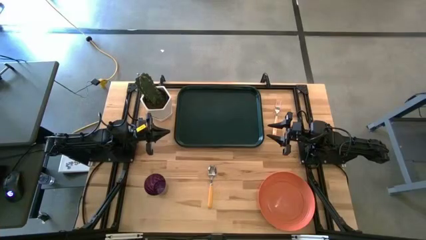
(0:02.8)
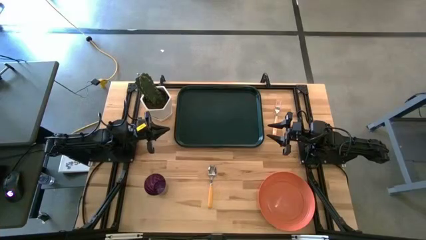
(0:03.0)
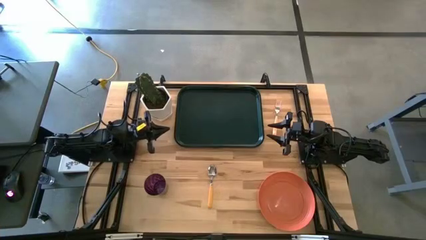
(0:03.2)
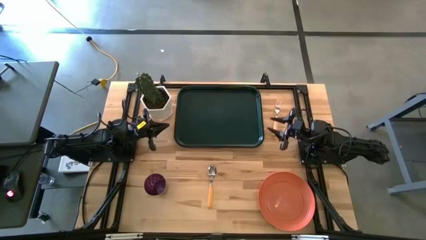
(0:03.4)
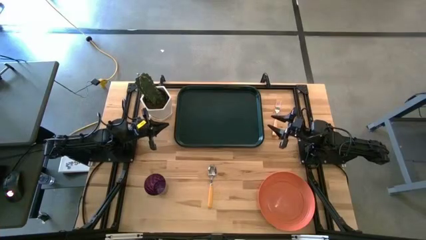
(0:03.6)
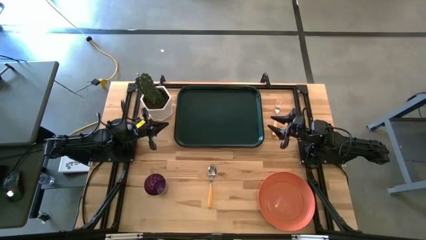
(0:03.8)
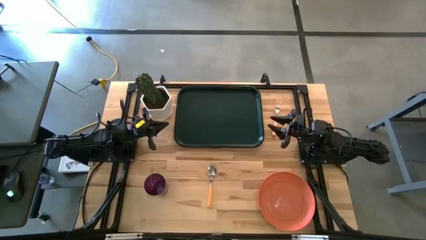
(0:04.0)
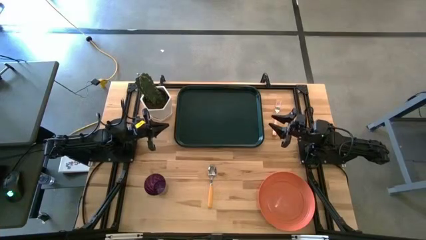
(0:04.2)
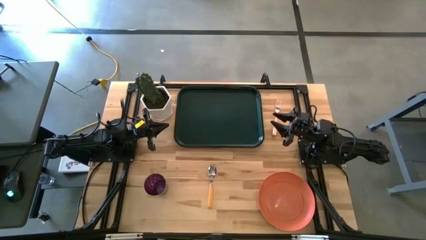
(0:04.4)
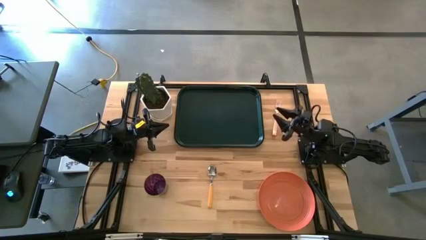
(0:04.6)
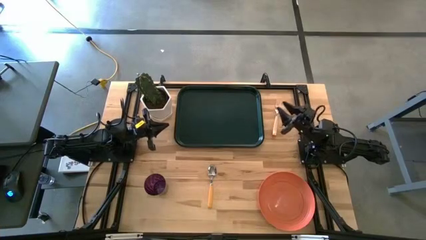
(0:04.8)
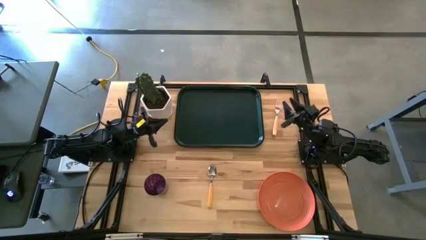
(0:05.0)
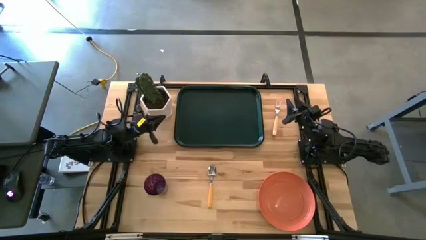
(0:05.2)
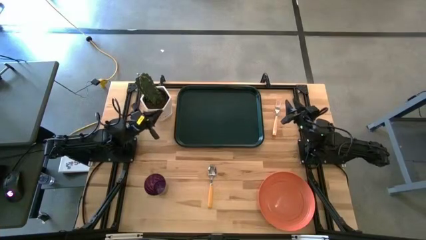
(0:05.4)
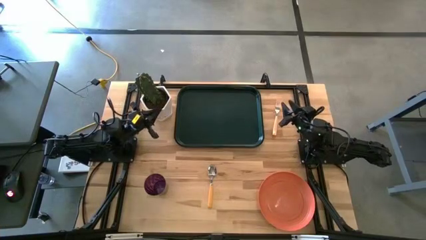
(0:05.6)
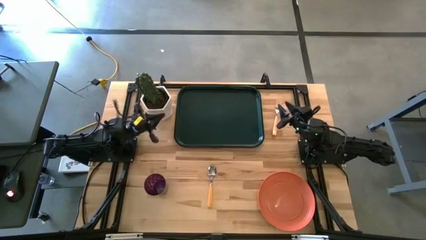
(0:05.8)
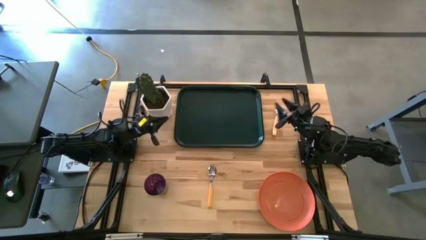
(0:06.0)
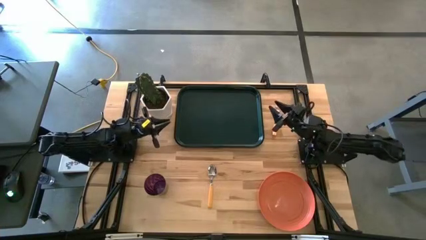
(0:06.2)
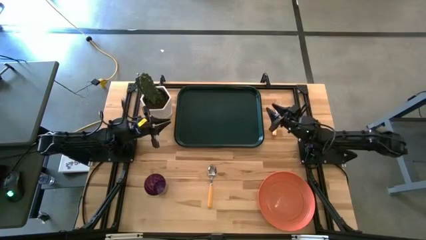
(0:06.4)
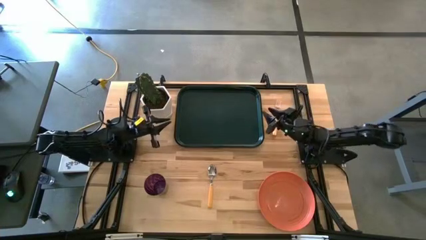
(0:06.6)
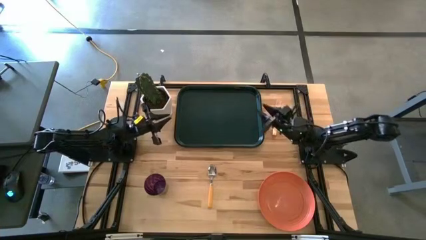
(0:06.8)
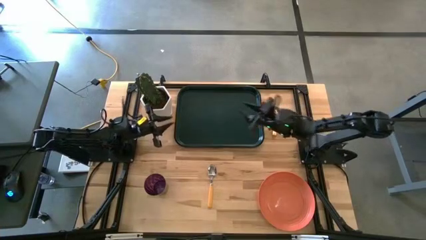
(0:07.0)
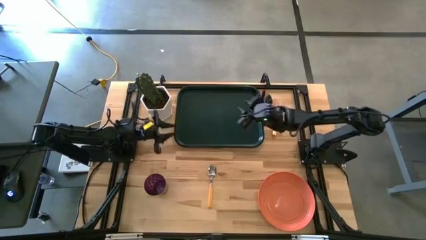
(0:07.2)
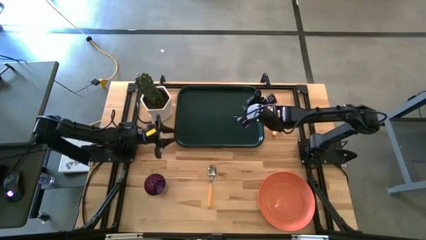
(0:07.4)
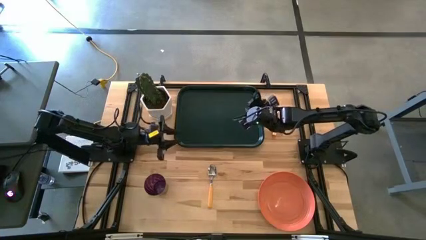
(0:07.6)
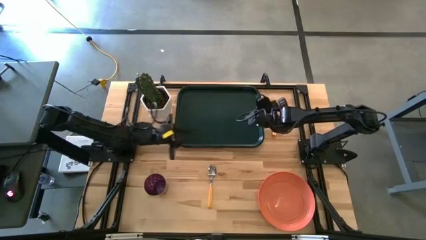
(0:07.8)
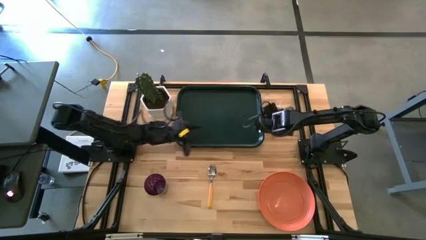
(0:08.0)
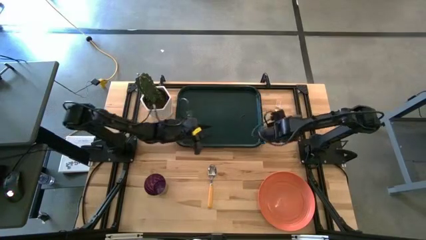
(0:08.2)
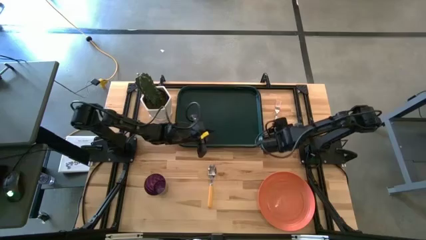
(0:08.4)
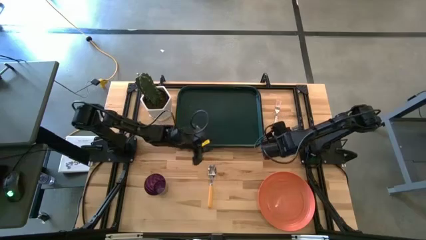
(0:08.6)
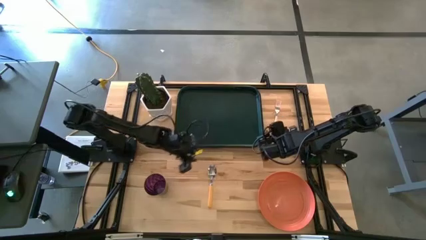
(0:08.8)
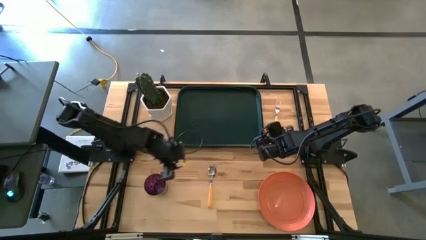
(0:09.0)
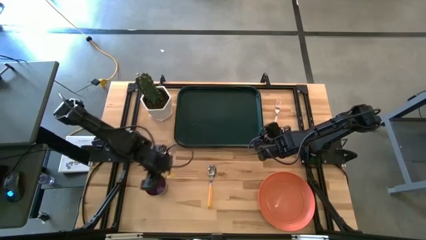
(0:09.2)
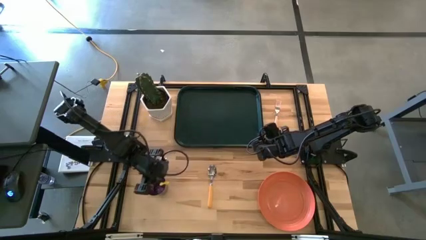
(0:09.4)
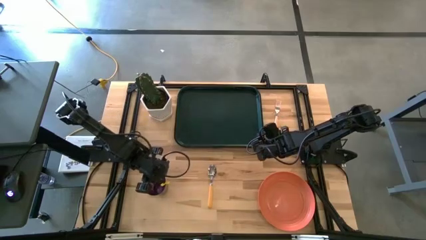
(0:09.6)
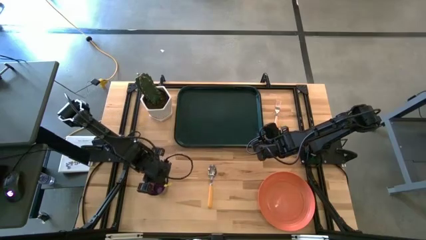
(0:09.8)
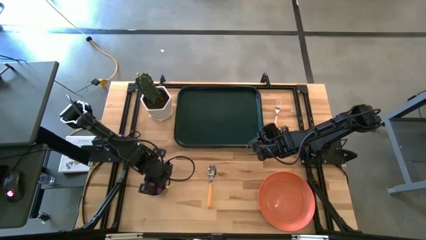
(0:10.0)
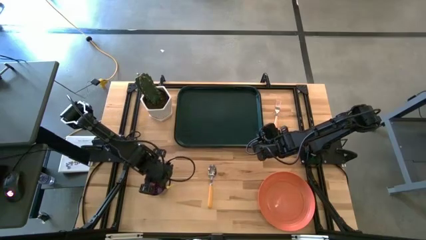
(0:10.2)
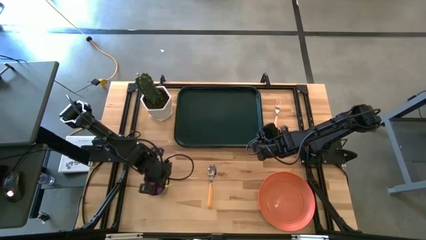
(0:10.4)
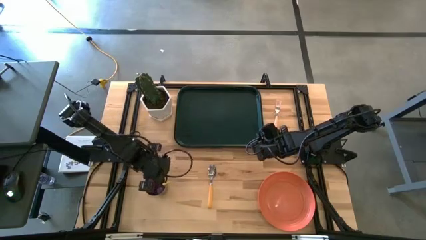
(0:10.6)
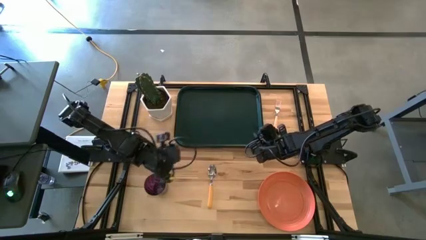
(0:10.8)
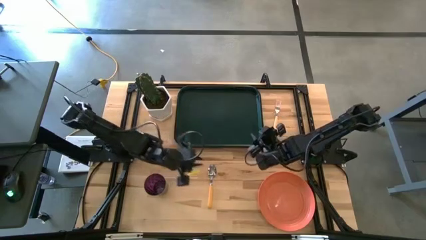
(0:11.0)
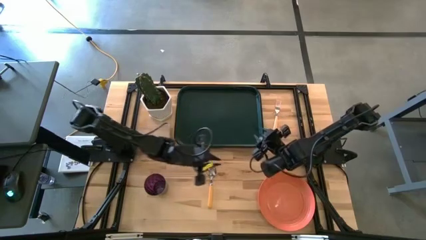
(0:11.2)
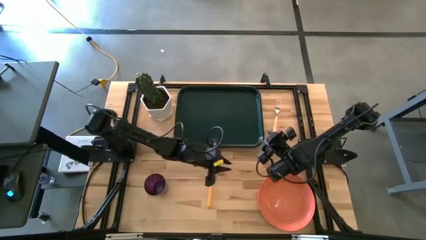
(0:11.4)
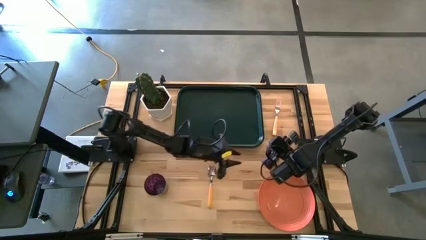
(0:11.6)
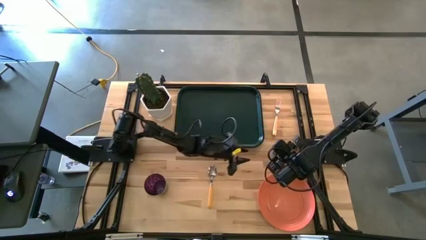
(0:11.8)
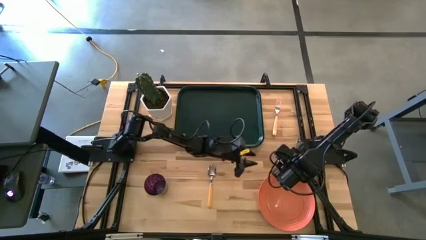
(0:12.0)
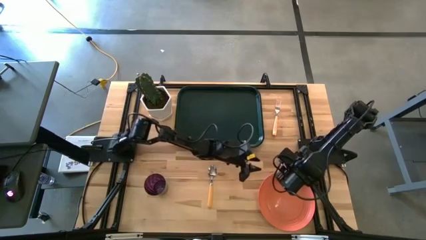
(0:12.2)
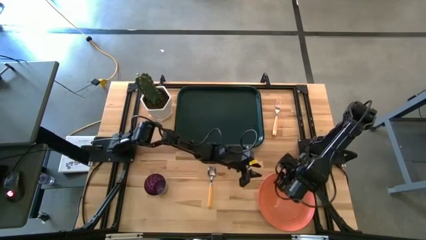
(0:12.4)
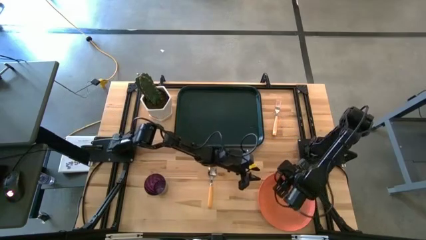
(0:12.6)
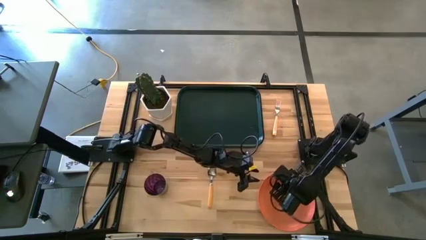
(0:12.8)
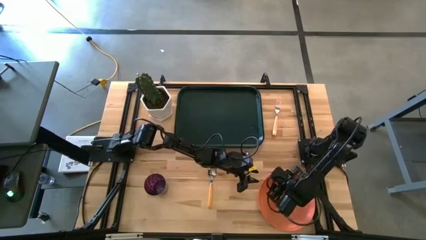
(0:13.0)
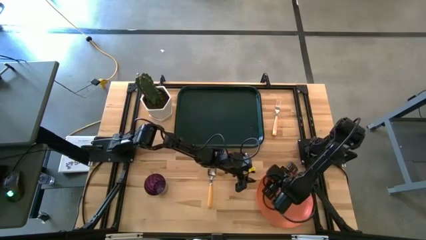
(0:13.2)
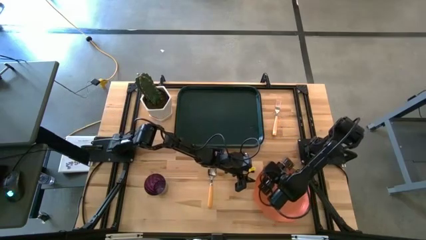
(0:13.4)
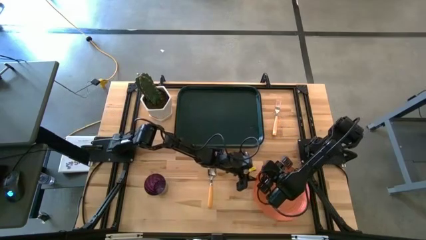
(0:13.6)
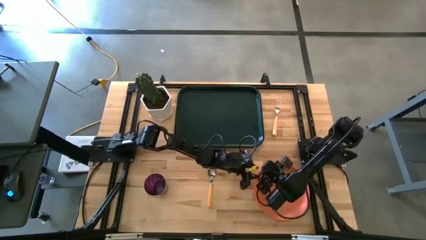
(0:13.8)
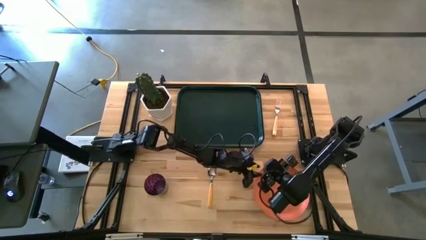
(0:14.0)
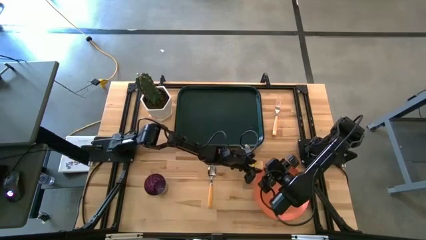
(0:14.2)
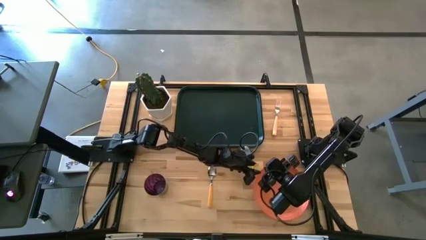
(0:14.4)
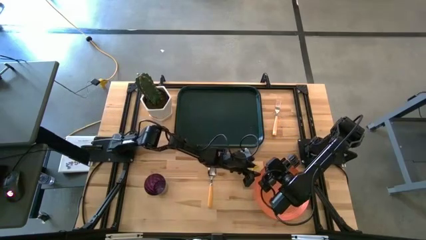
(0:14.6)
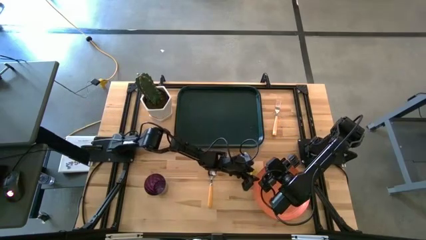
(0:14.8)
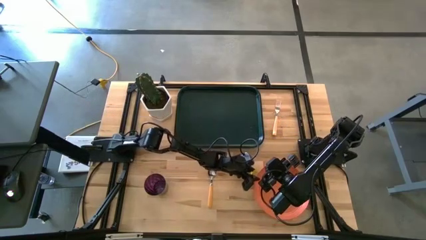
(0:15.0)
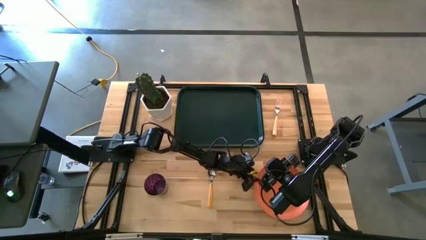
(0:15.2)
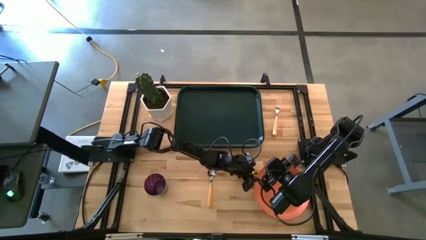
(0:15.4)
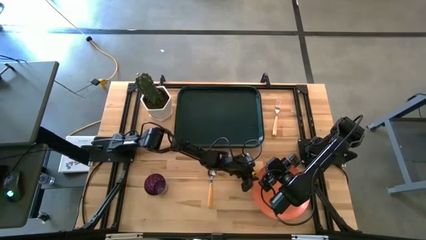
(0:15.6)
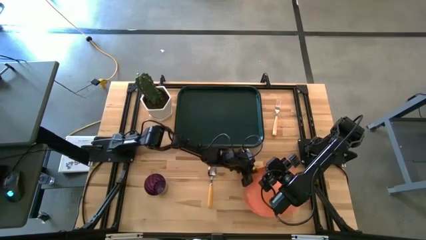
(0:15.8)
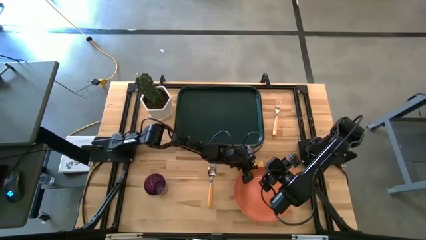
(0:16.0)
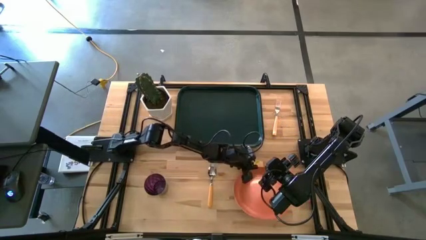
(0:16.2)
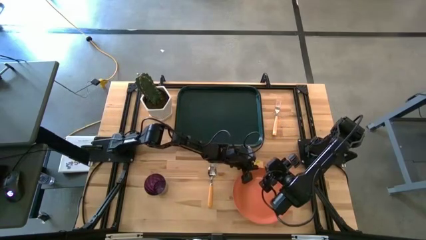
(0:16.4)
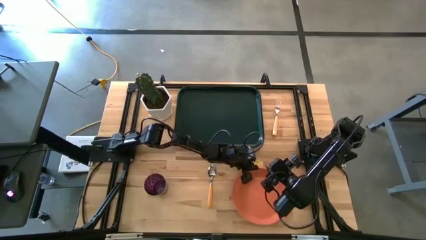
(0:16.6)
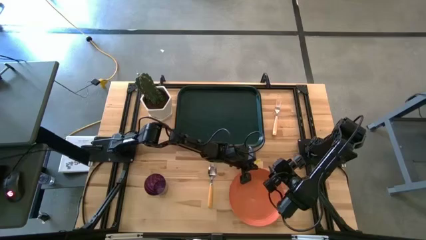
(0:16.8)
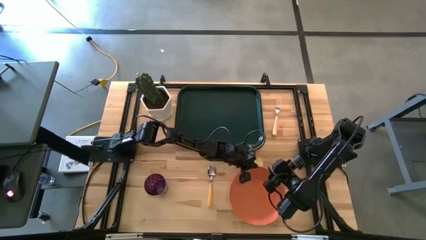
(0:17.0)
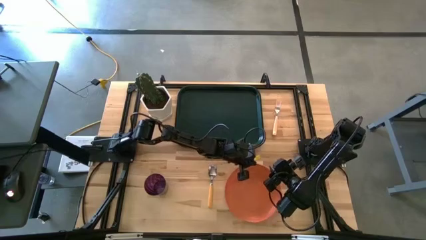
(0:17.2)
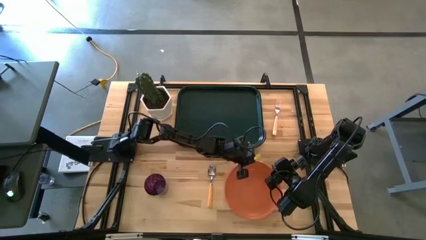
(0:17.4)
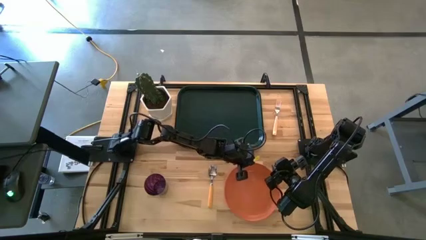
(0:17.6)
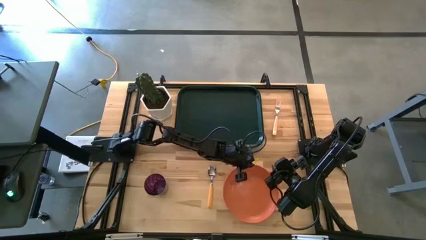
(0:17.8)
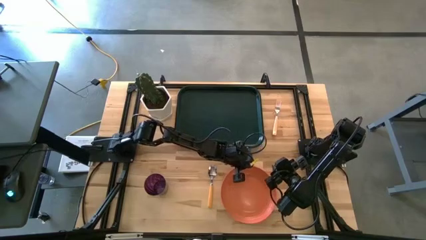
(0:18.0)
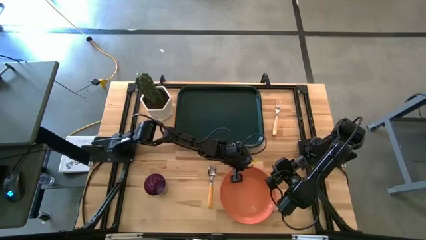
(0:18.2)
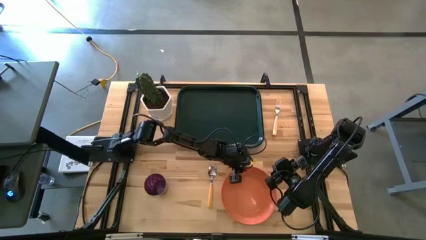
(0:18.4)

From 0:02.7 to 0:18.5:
Task: Pick and place plate/cup/fork/spoon on tray
Put the orange plate on the dark green tray
